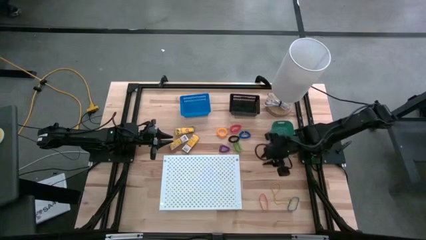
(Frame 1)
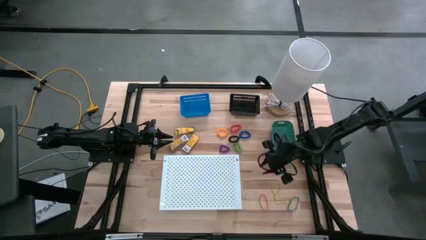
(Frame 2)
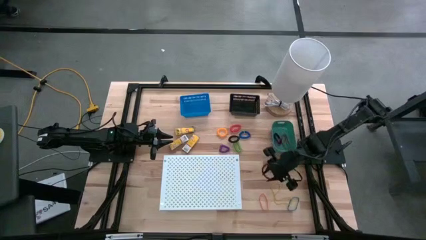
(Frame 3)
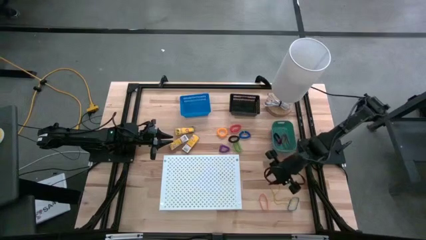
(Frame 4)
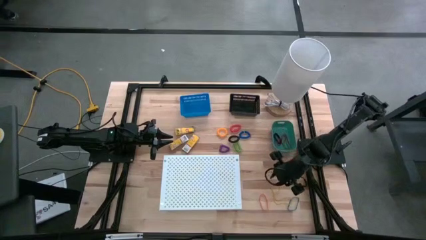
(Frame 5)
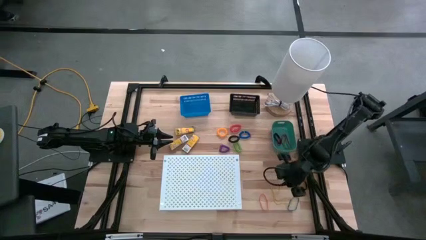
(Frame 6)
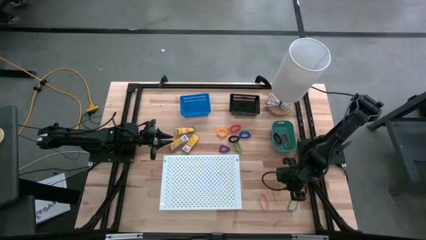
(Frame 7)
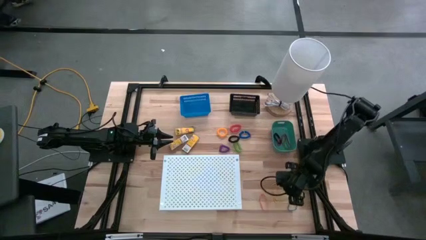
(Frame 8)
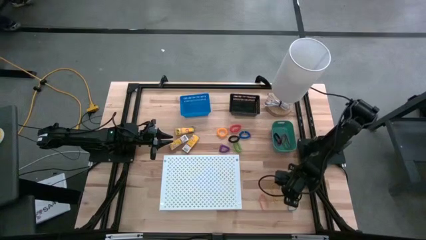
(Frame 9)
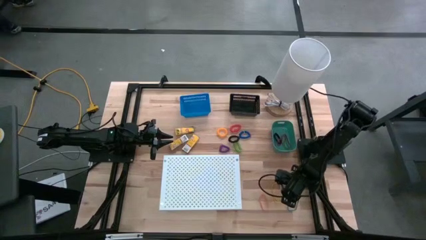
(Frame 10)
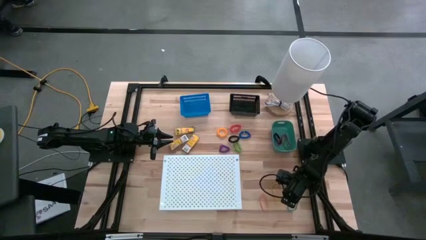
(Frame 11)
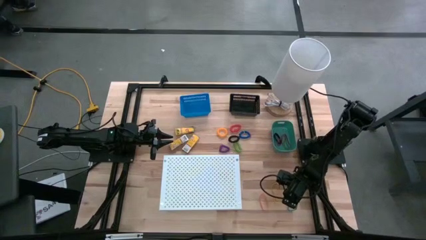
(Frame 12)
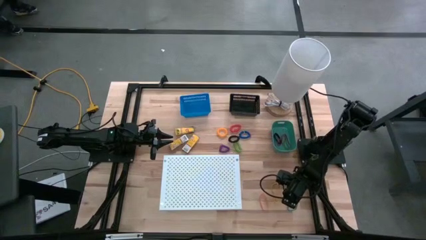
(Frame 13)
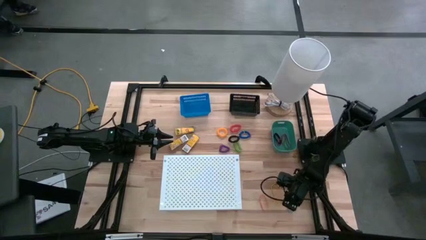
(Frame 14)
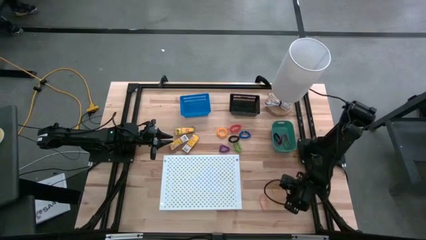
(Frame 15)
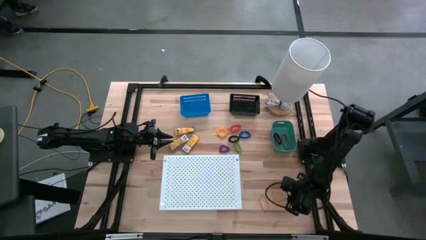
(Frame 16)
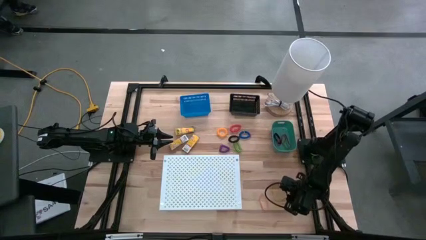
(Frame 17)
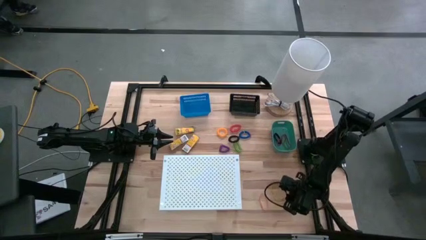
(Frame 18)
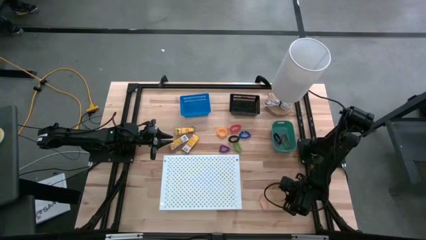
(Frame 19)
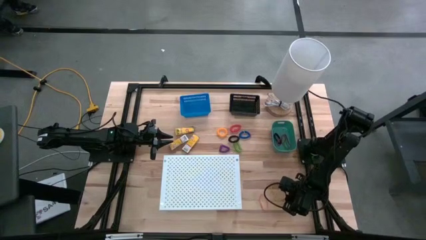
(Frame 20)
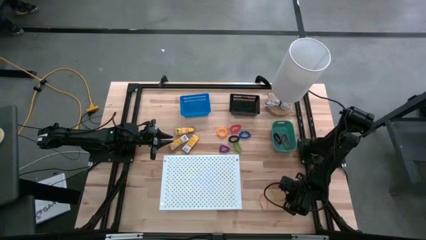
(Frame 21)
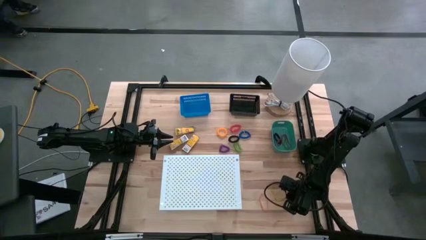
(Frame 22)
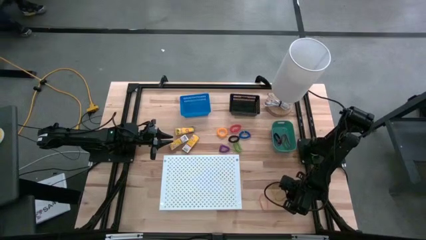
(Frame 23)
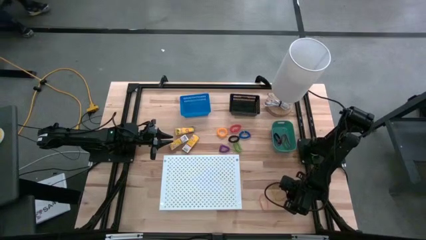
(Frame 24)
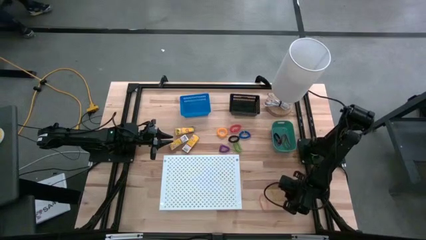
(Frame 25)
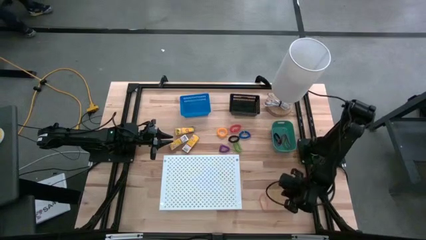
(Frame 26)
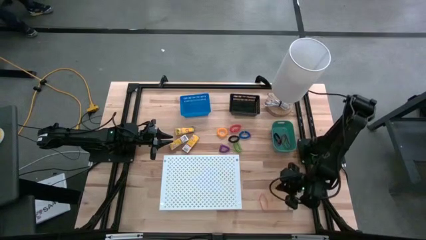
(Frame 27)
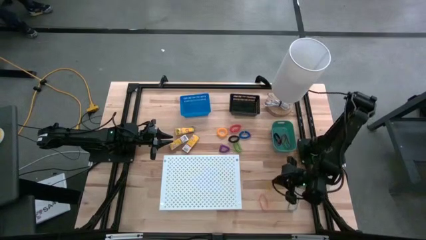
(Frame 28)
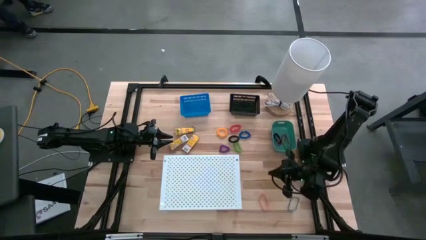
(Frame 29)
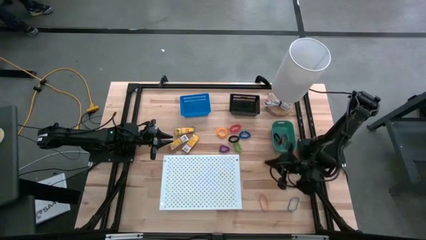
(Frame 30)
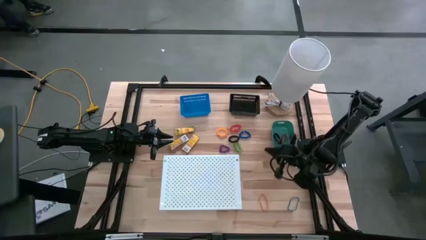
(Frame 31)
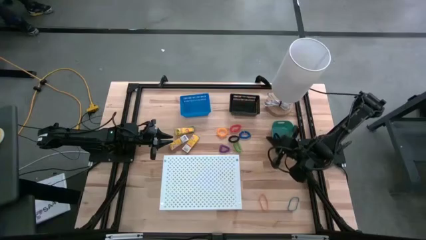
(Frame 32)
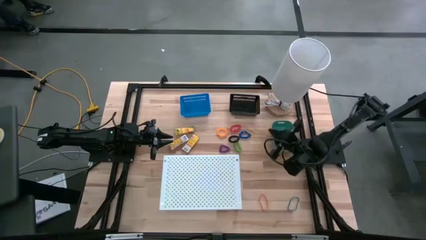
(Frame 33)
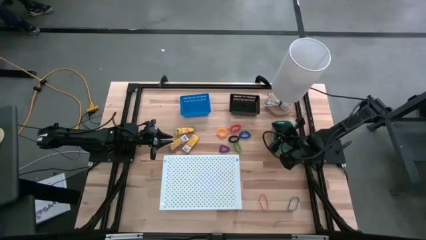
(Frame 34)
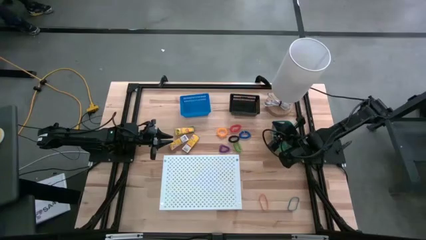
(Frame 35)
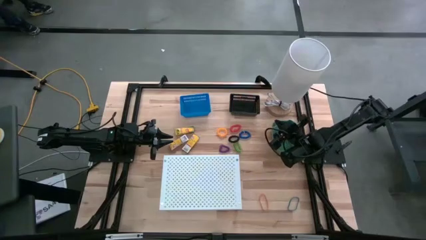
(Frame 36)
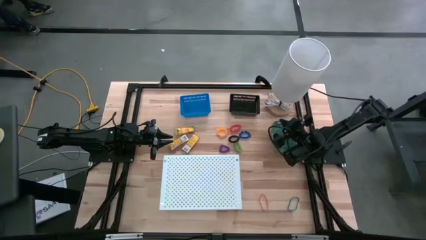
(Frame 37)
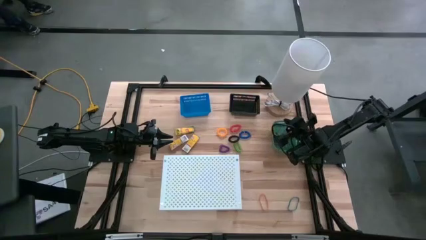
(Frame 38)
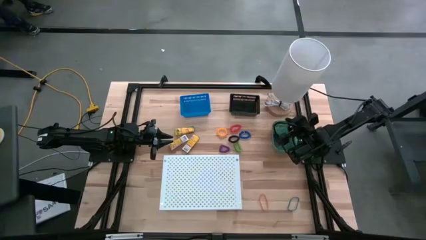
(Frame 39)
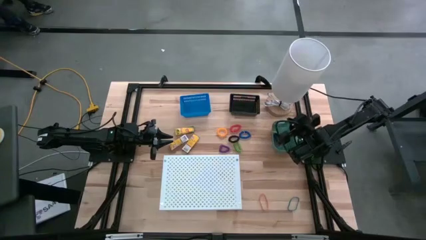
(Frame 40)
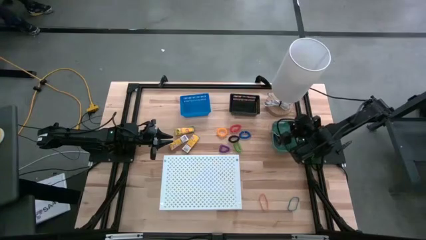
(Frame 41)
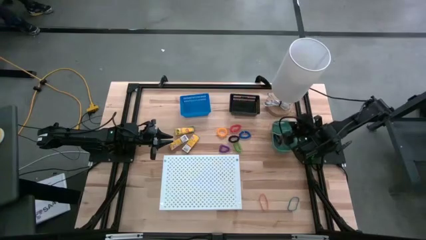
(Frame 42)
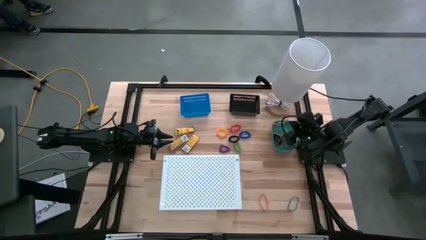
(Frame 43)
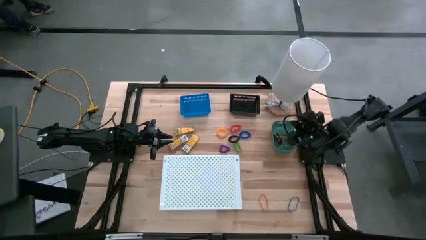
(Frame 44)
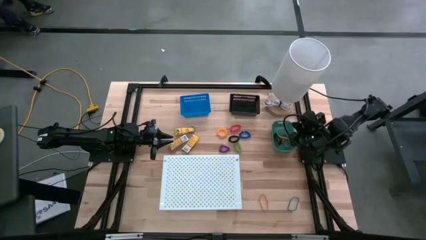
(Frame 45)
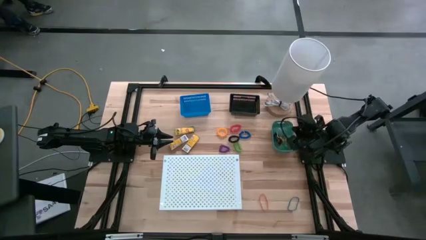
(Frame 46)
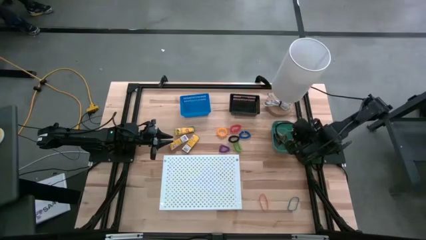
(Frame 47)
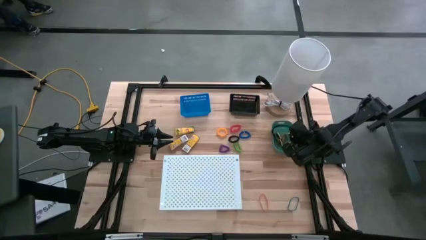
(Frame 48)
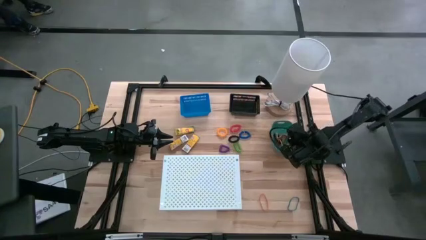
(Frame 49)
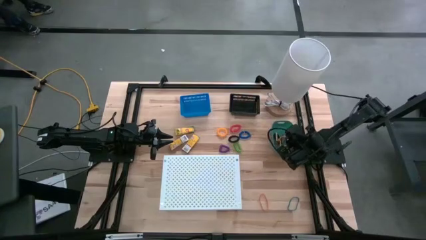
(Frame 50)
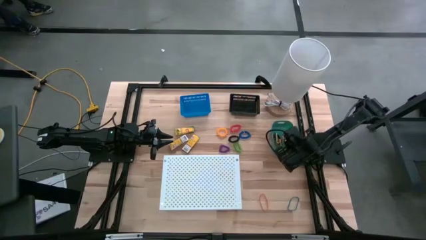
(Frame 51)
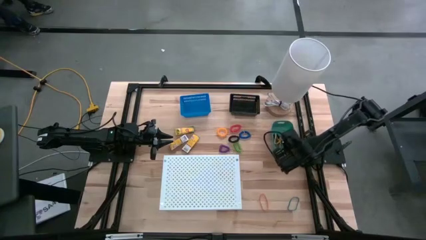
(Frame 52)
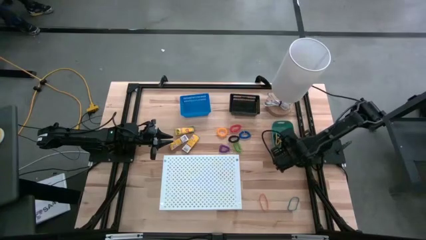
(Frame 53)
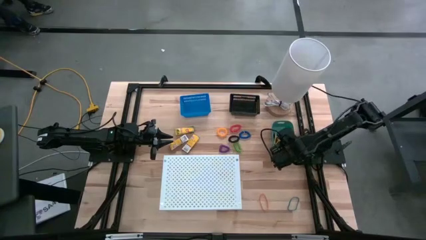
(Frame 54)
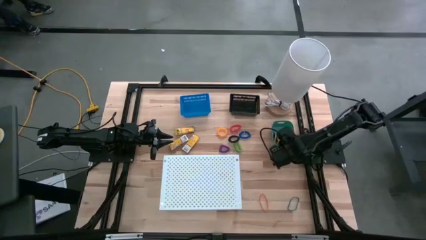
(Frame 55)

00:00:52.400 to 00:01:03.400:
Task: Pick & Place Office Desk Supplies
Put the yellow rubber band into the green bin

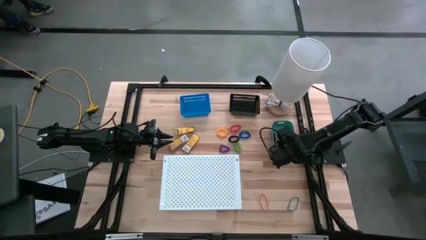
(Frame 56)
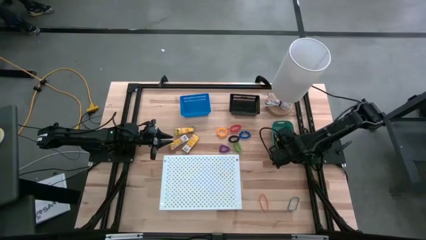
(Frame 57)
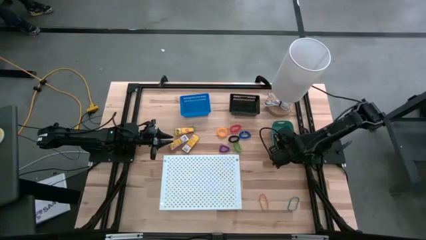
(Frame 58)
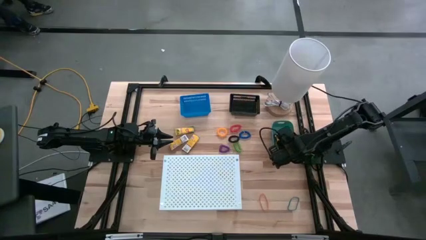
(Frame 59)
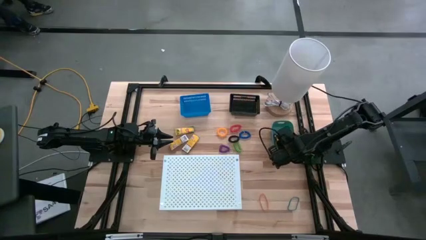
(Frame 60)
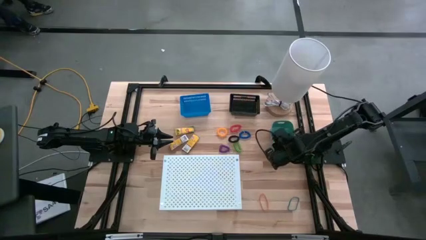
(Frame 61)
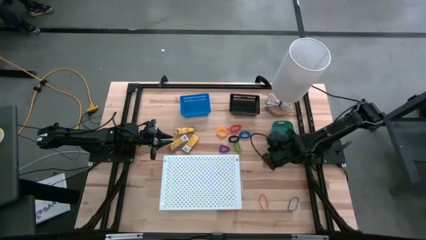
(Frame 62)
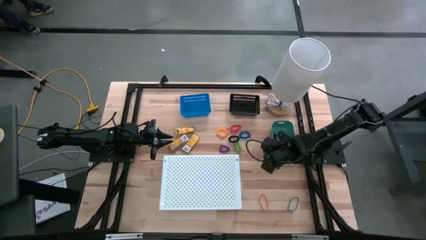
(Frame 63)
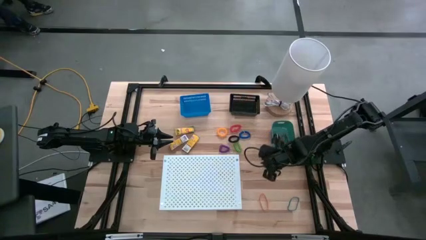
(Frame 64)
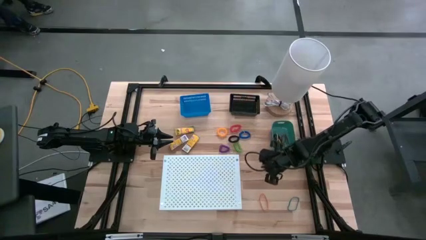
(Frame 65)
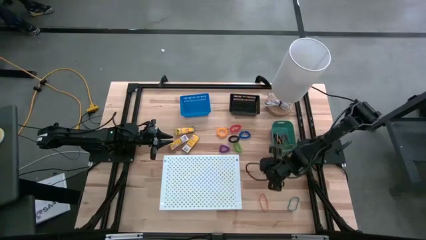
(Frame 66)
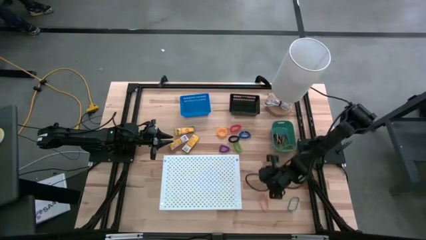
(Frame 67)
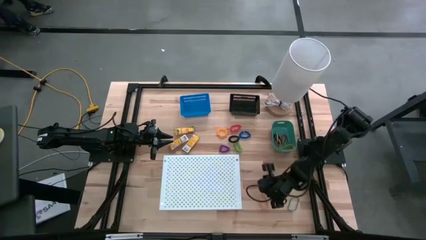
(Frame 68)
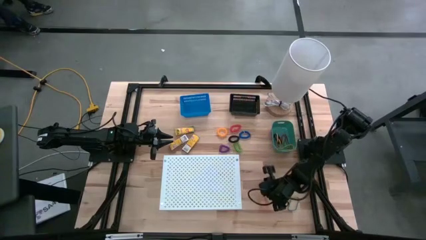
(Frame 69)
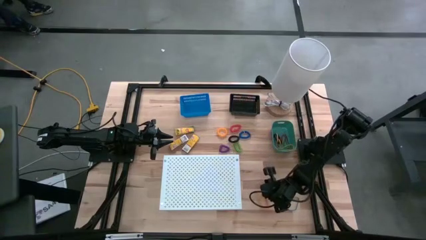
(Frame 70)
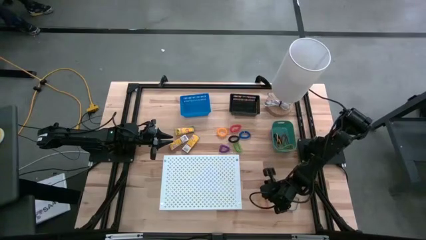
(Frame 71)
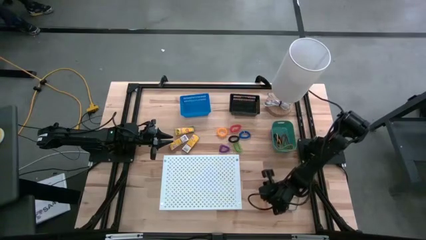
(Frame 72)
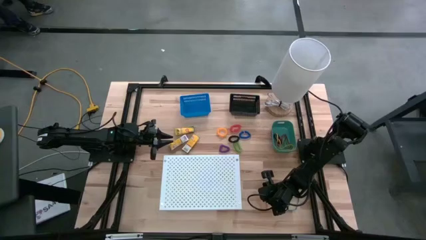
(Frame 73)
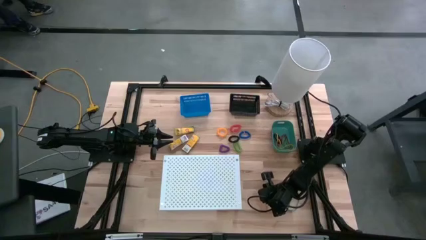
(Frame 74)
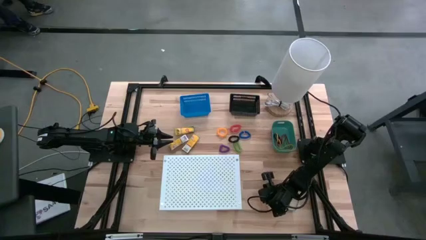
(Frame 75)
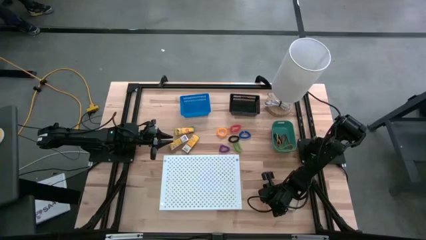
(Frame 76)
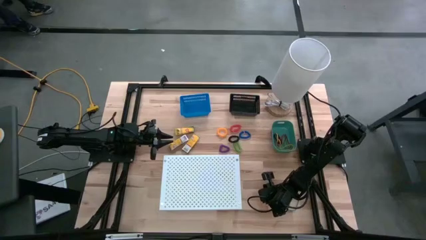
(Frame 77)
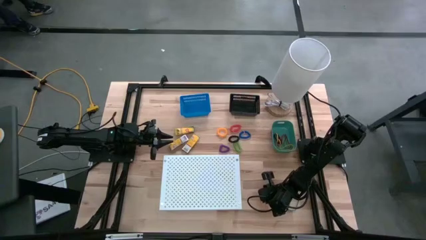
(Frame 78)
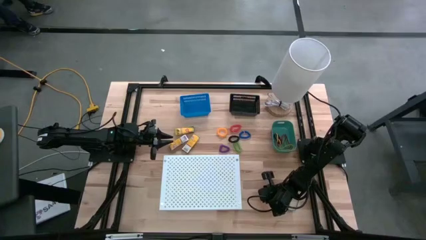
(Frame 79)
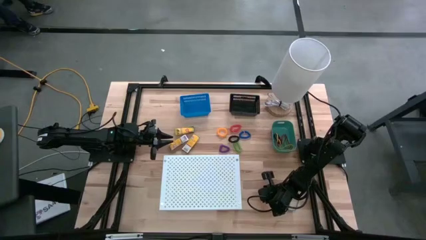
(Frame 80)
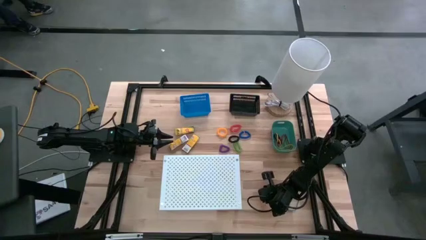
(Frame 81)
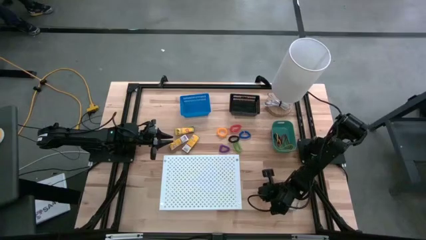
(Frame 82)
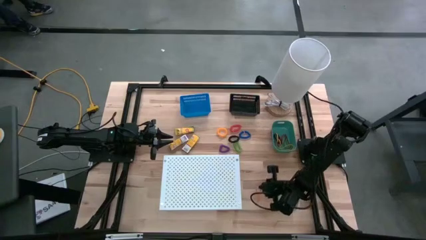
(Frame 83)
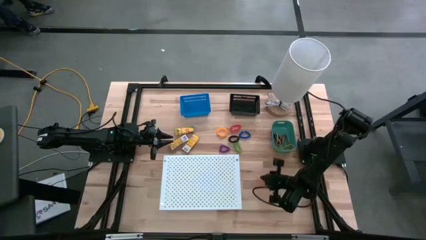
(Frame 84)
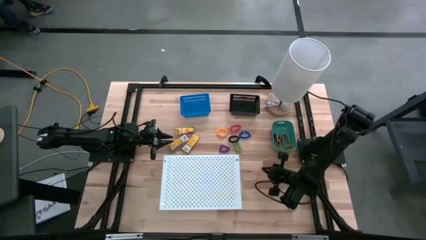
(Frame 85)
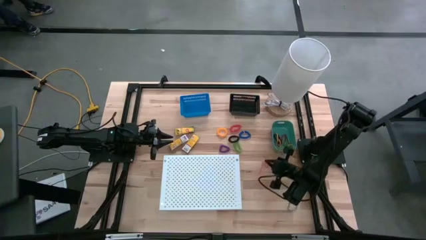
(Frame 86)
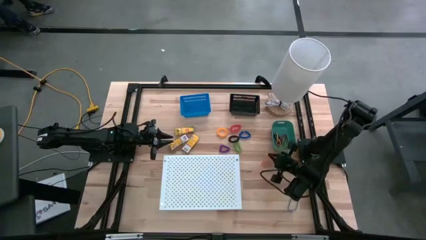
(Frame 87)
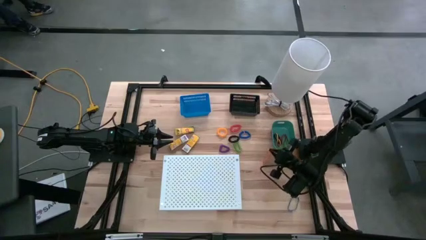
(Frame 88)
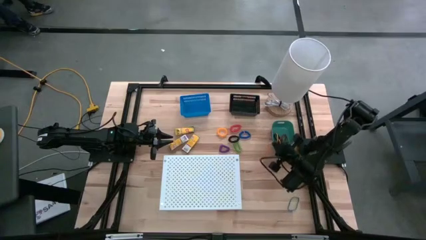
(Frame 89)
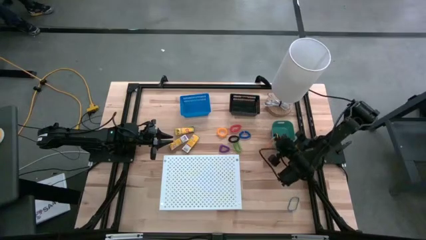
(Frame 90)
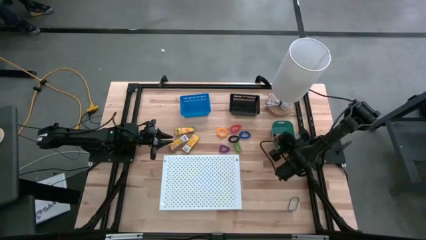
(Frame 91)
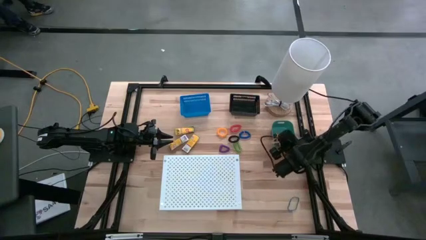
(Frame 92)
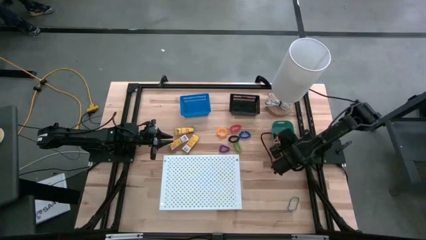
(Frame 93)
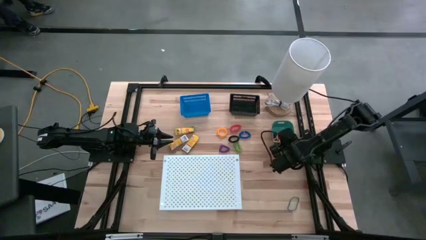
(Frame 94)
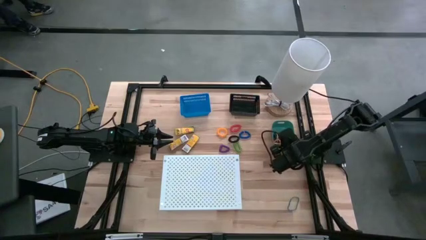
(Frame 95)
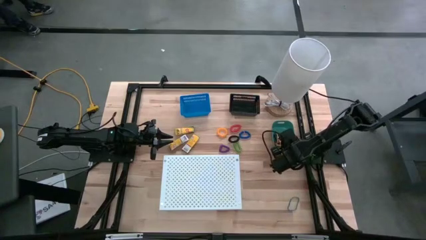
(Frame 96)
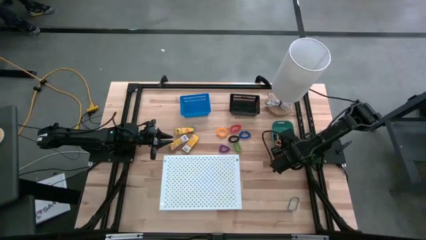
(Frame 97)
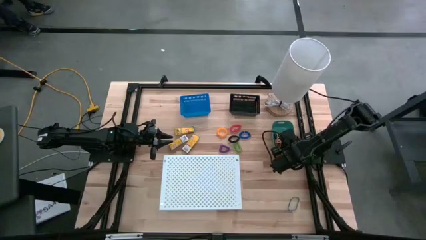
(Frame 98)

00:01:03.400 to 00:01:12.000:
Put the orange rubber band into the green bin
